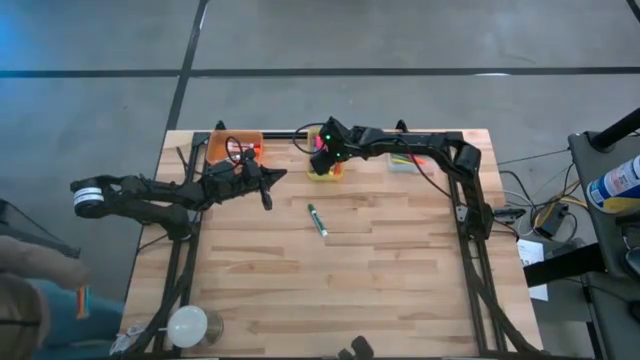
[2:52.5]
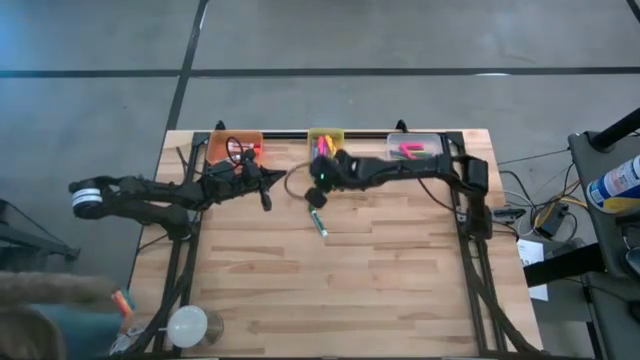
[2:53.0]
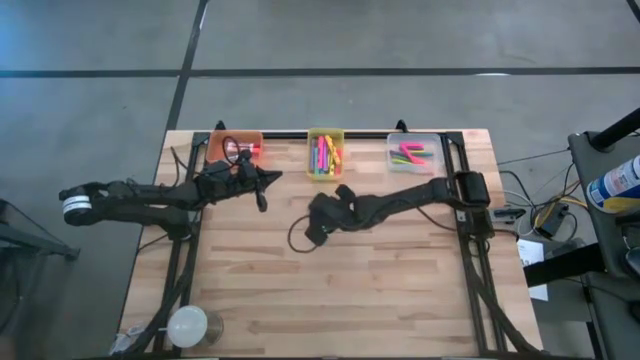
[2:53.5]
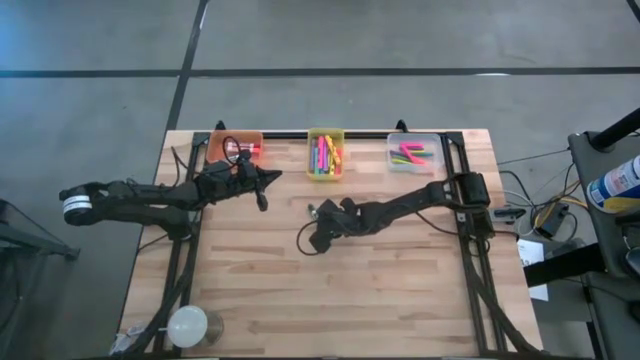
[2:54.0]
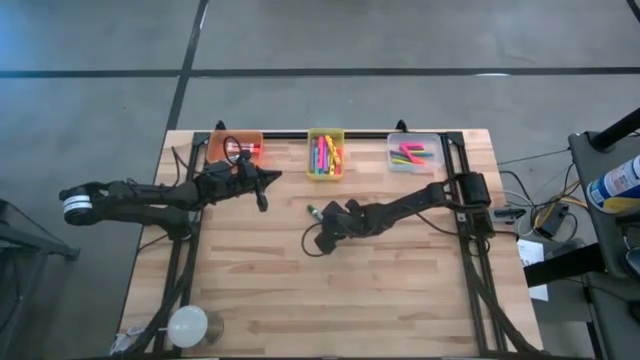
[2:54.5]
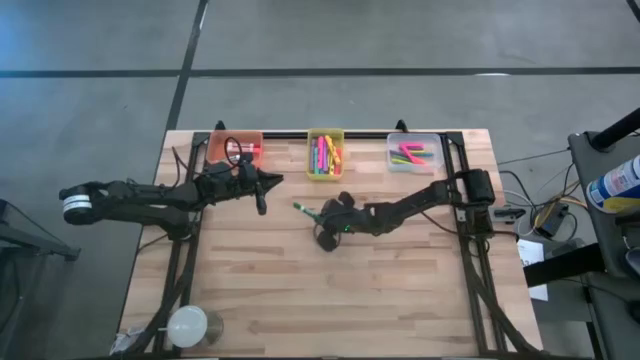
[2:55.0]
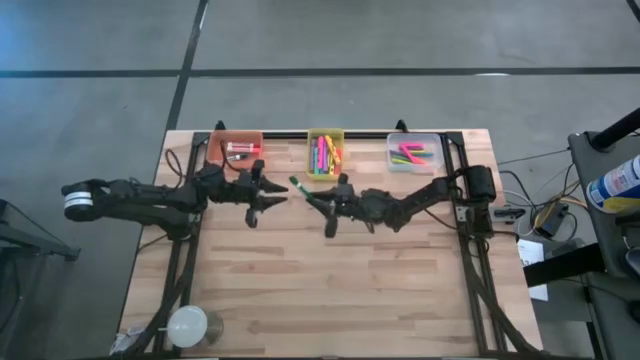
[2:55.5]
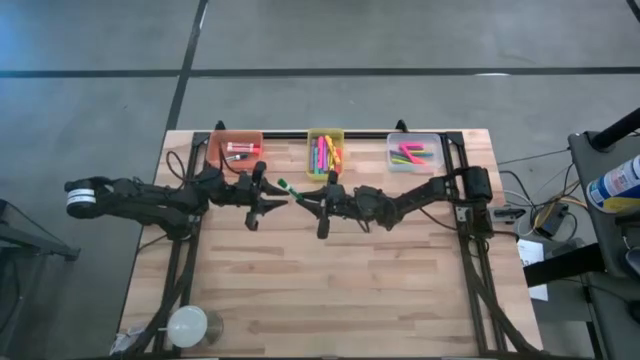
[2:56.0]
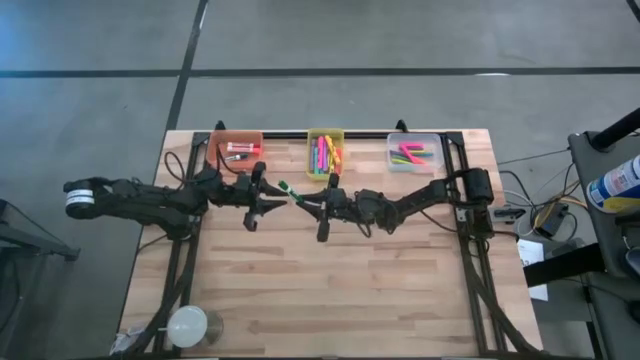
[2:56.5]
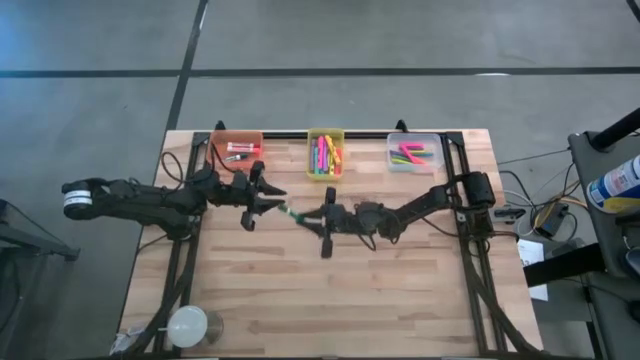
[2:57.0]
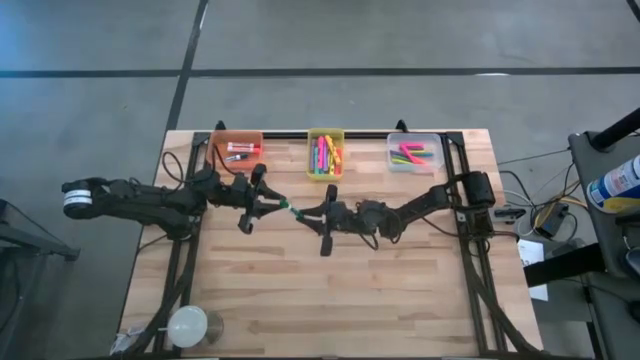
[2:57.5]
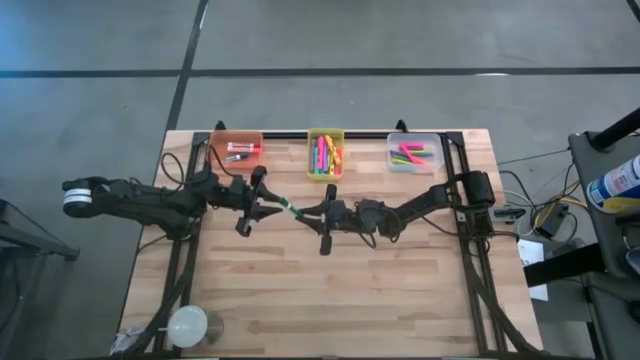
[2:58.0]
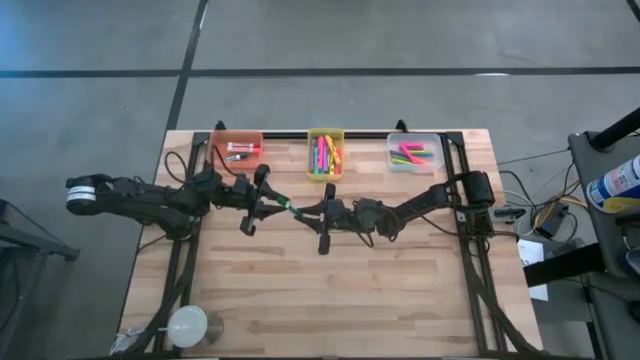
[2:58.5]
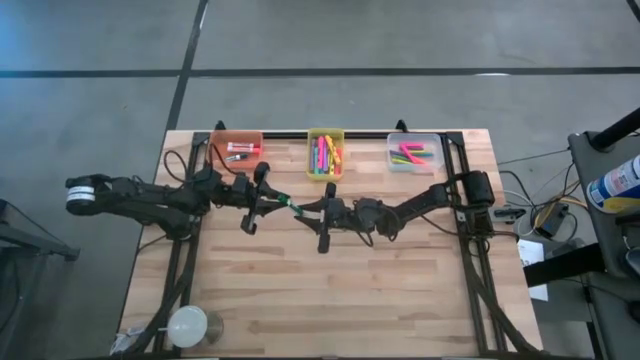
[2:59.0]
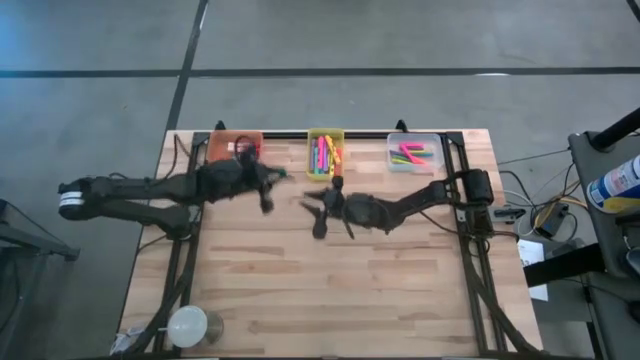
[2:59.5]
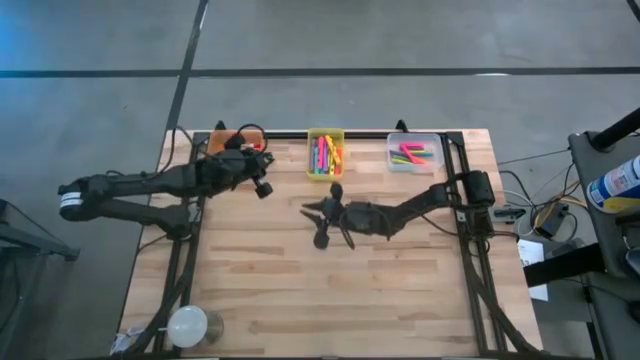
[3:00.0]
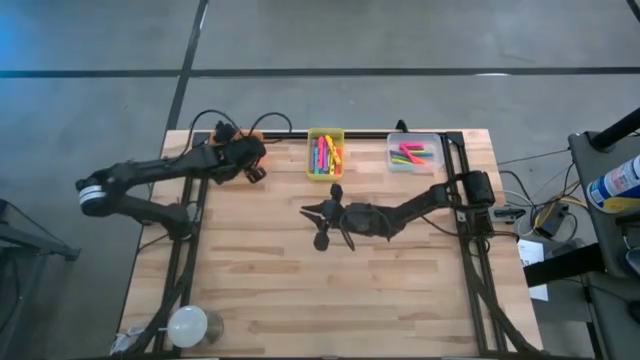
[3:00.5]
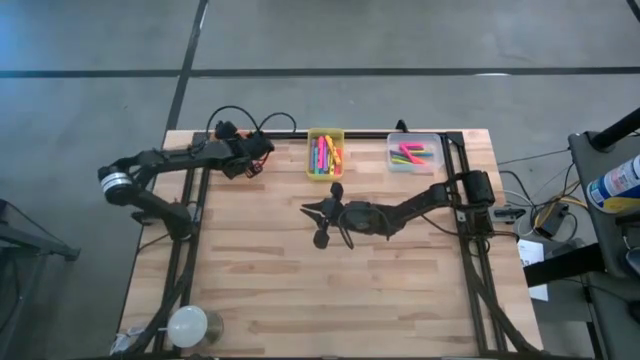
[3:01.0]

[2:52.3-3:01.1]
Task: Pick & Place Markers
Put the green marker pen into the orange bin

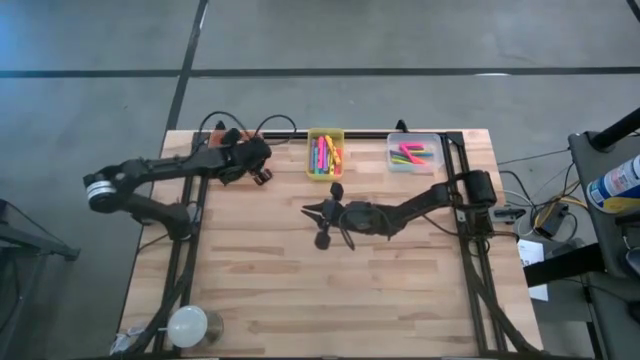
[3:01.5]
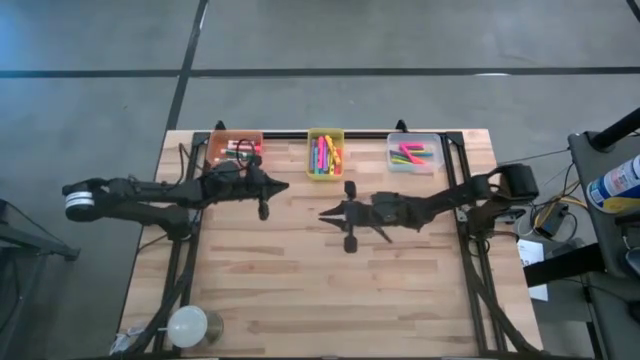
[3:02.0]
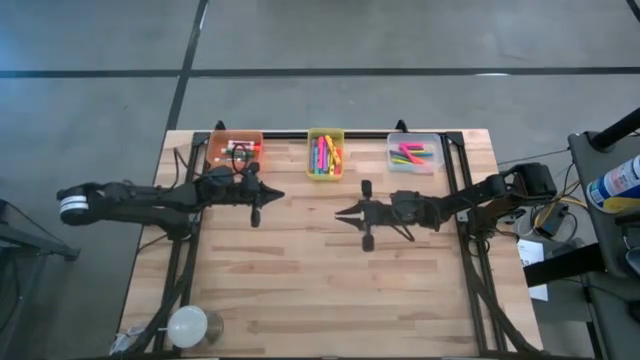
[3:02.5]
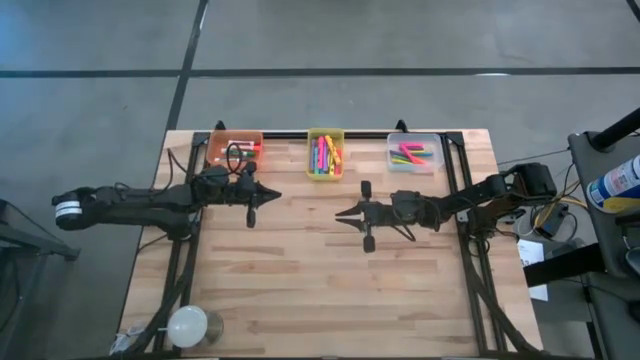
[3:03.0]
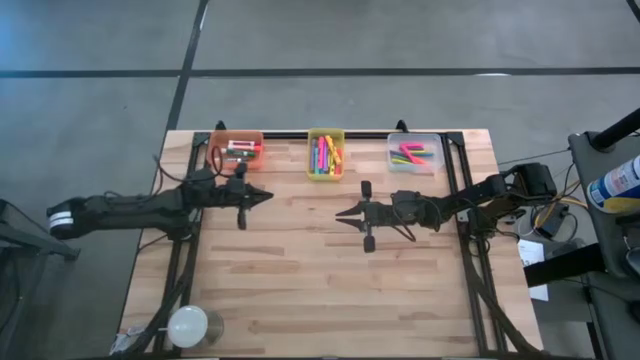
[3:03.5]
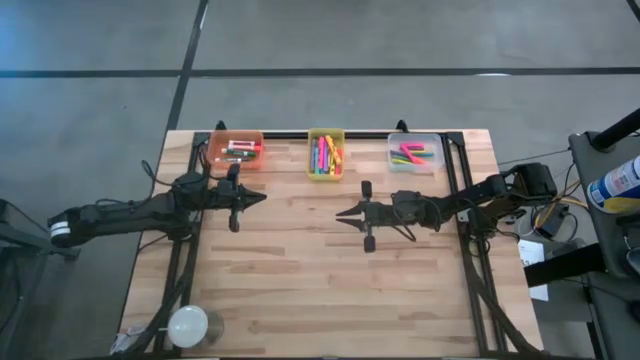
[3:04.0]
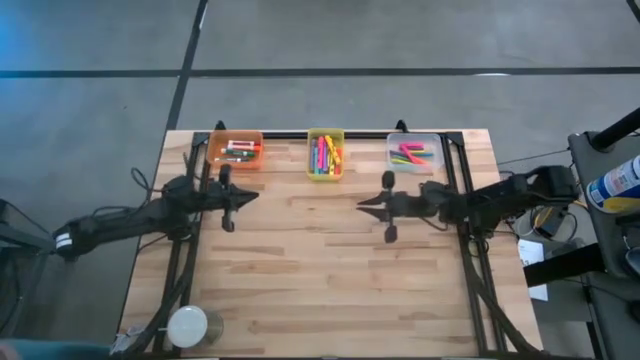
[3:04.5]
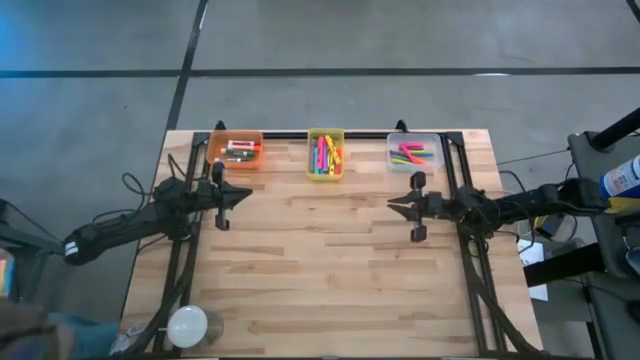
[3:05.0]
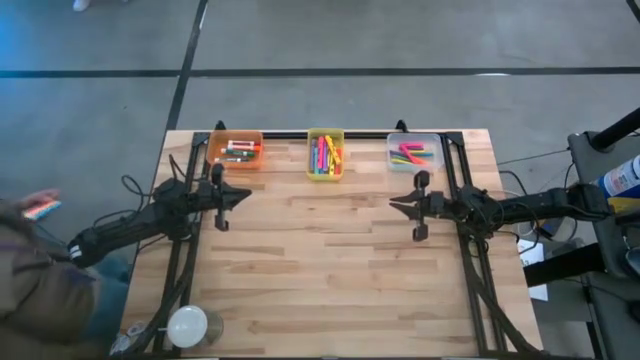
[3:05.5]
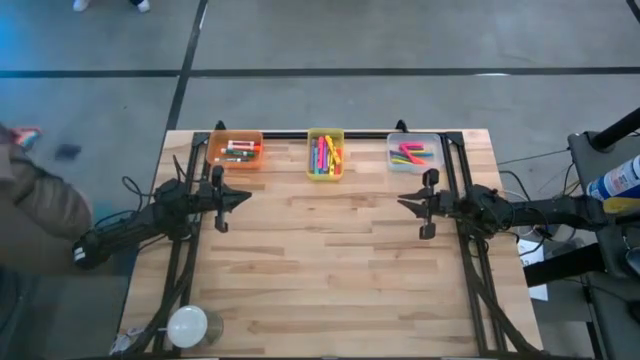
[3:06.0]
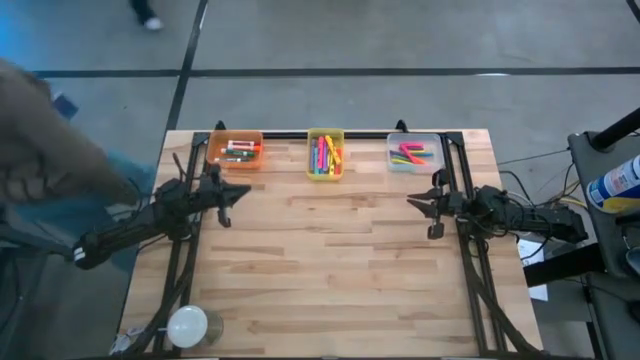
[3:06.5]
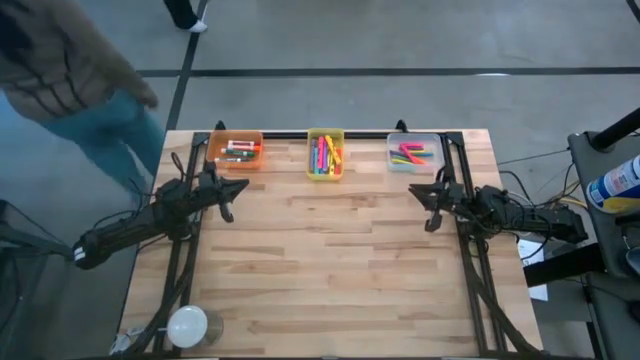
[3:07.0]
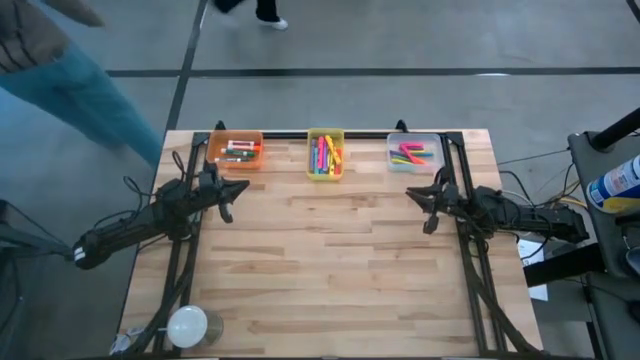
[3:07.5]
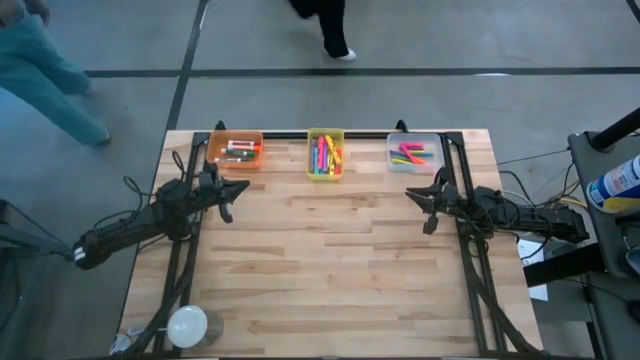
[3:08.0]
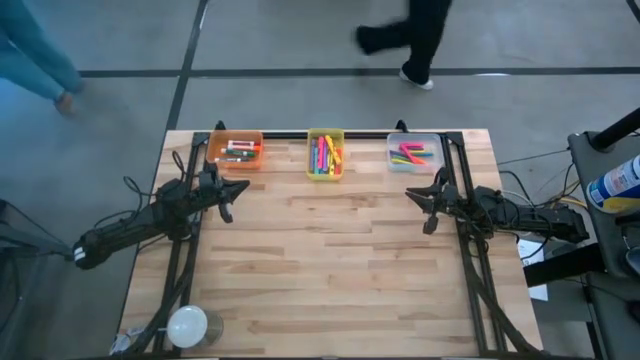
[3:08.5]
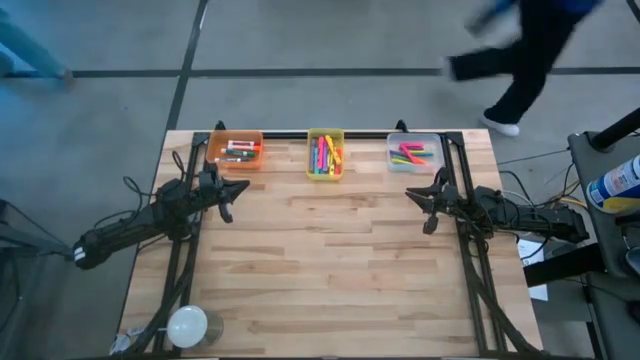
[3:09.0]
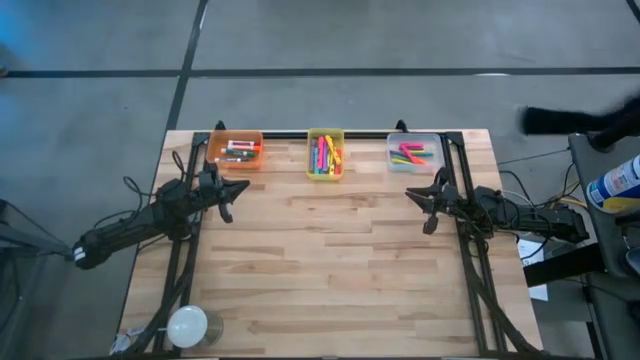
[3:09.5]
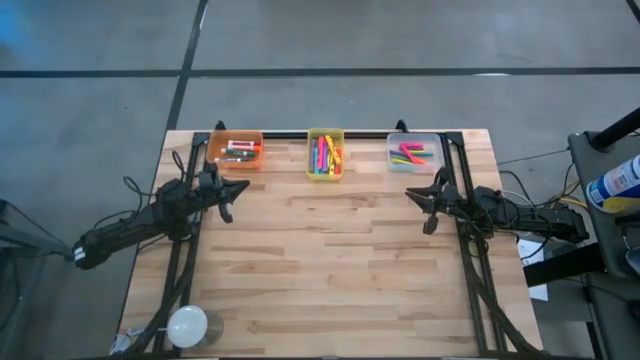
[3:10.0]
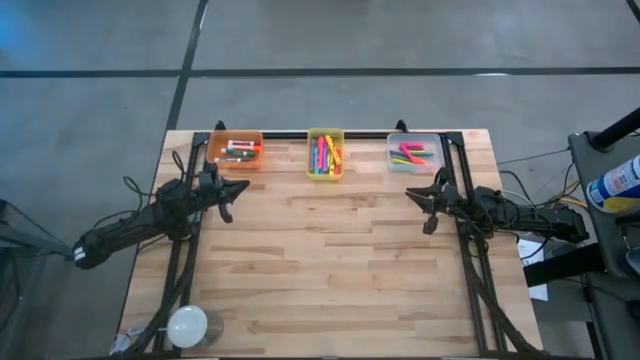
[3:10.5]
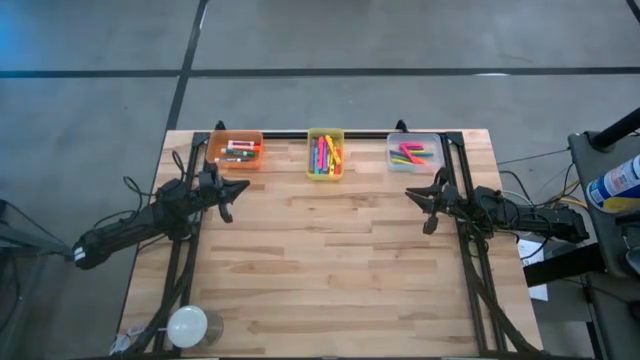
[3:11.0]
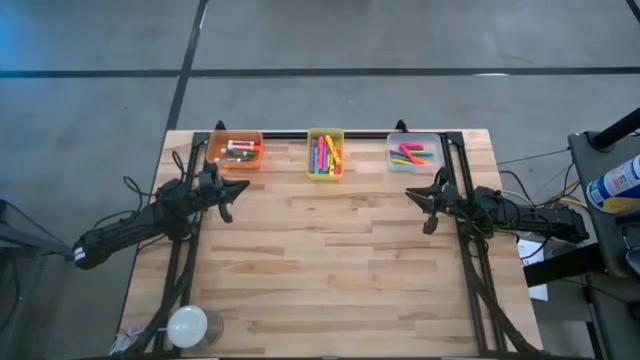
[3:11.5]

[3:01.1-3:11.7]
Return to Home Position
